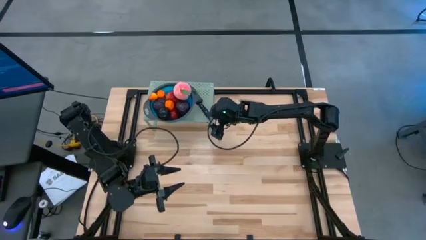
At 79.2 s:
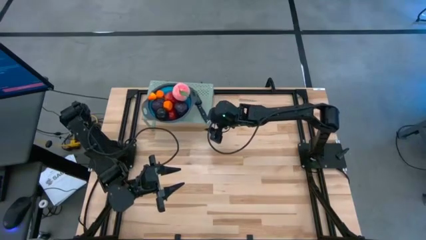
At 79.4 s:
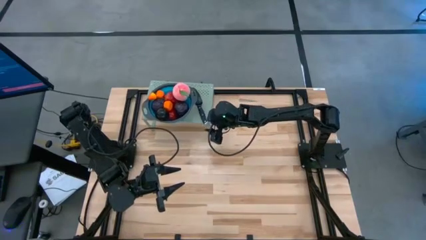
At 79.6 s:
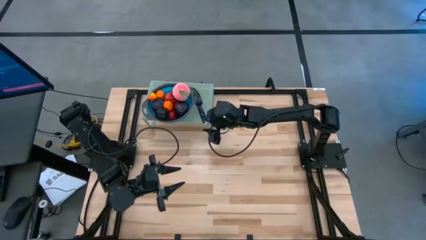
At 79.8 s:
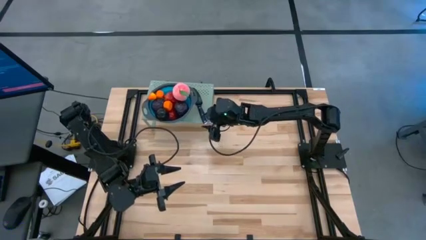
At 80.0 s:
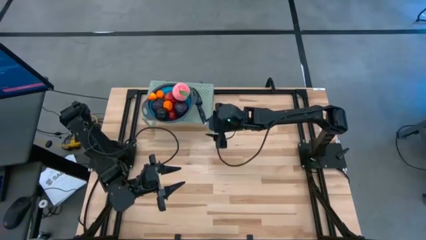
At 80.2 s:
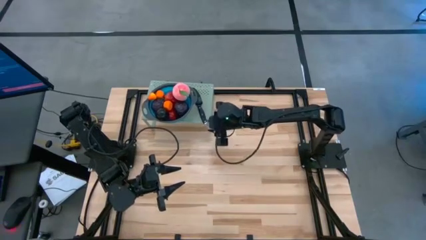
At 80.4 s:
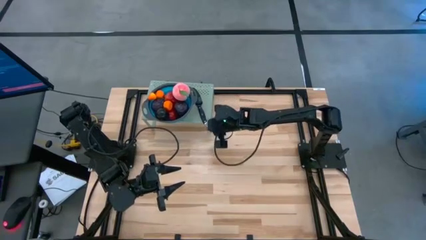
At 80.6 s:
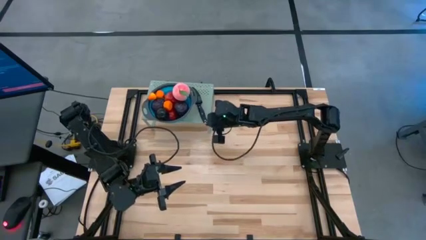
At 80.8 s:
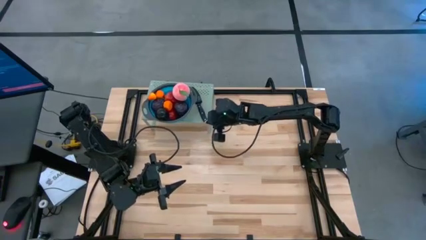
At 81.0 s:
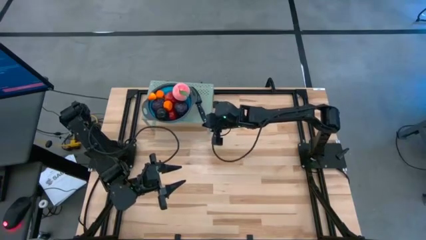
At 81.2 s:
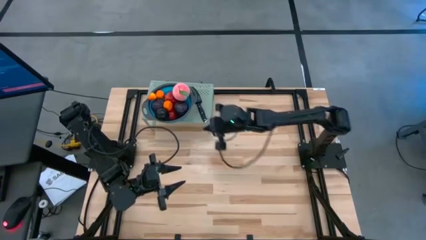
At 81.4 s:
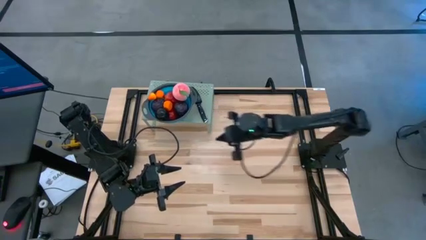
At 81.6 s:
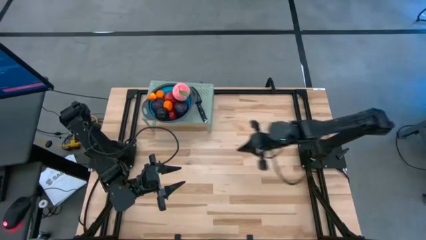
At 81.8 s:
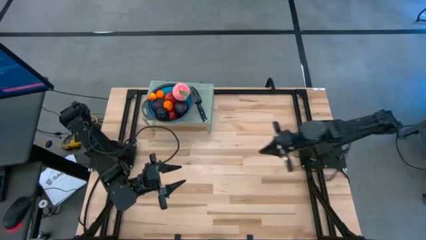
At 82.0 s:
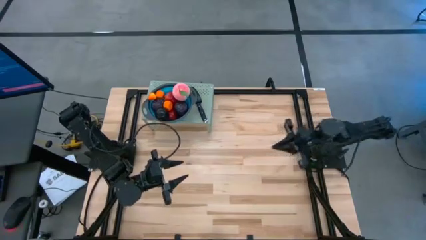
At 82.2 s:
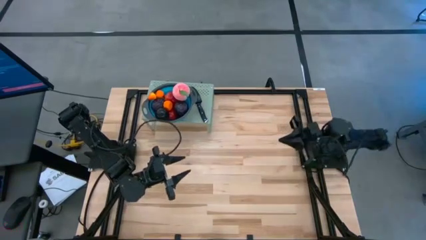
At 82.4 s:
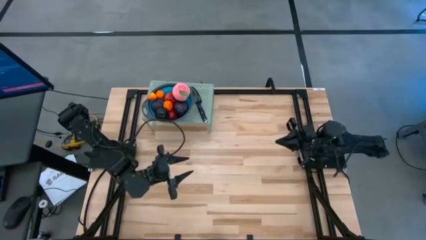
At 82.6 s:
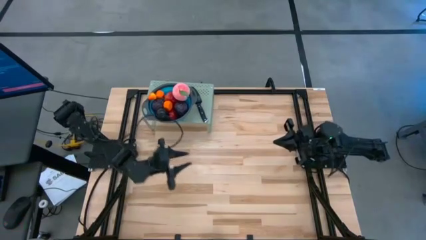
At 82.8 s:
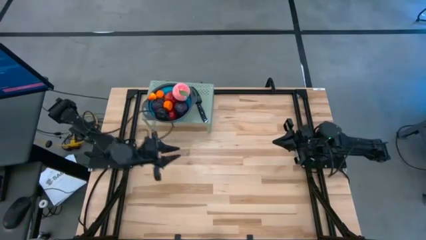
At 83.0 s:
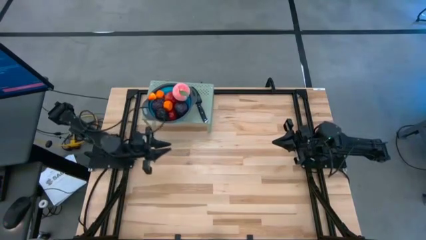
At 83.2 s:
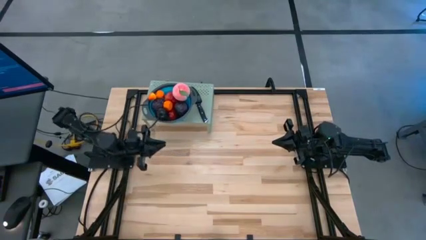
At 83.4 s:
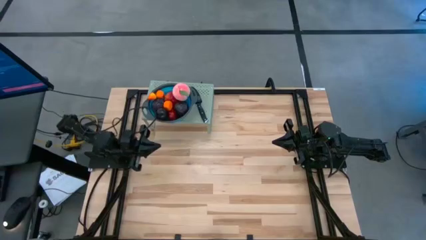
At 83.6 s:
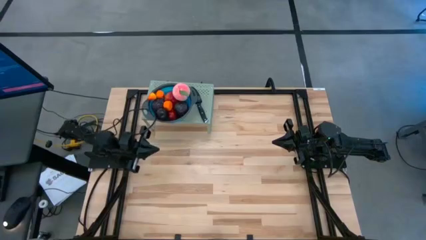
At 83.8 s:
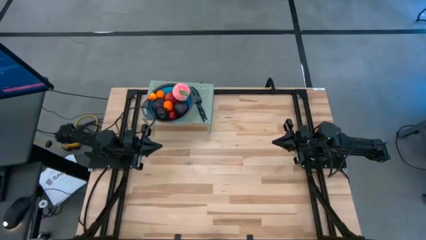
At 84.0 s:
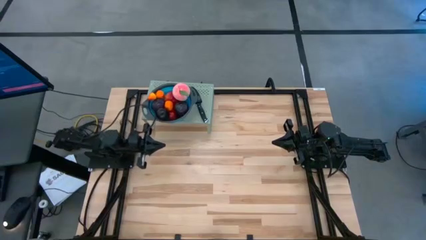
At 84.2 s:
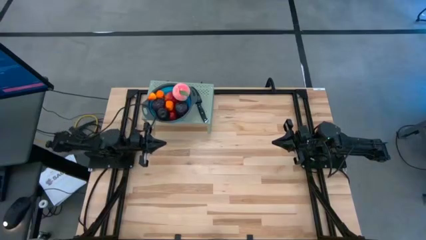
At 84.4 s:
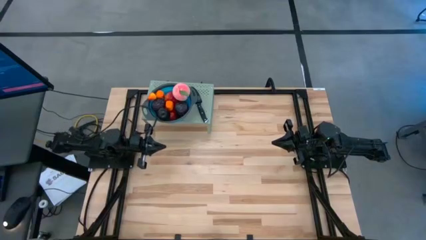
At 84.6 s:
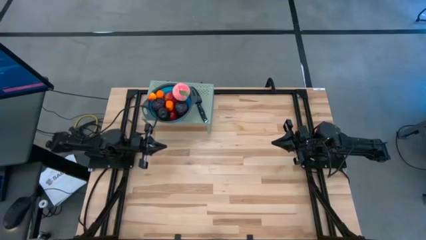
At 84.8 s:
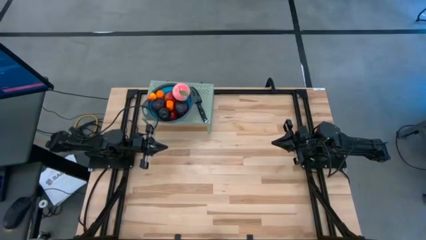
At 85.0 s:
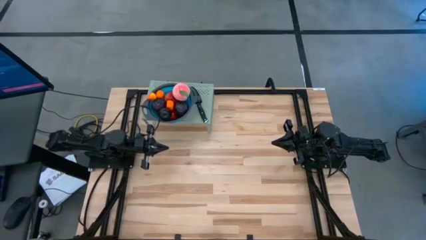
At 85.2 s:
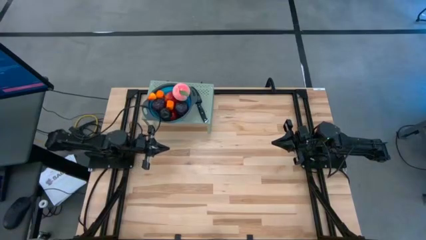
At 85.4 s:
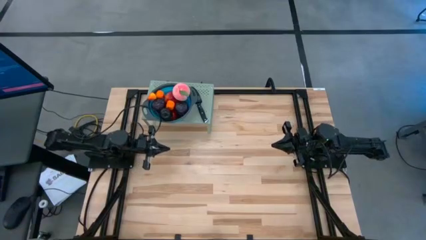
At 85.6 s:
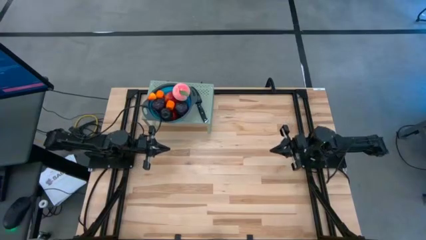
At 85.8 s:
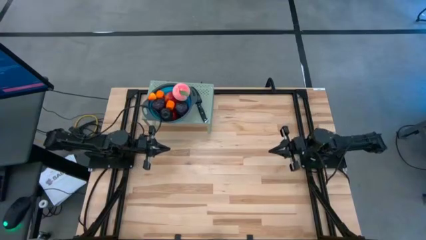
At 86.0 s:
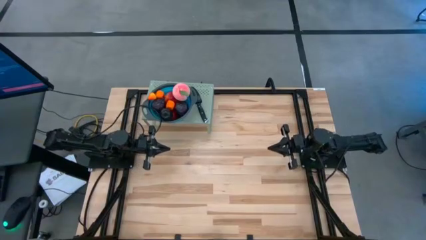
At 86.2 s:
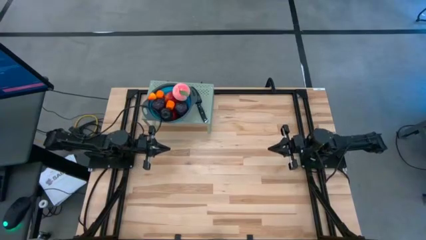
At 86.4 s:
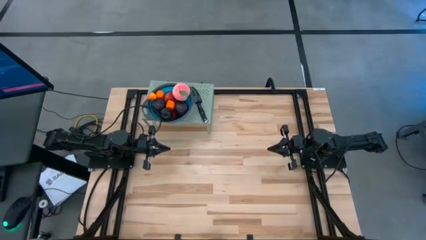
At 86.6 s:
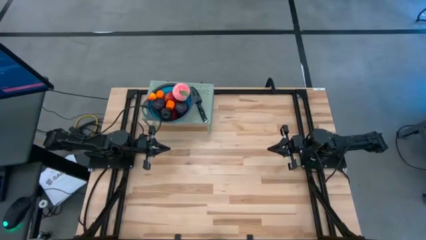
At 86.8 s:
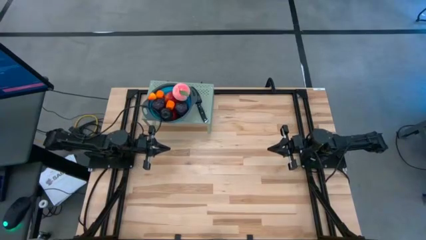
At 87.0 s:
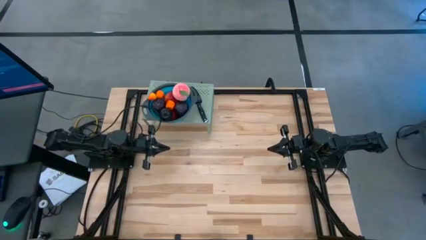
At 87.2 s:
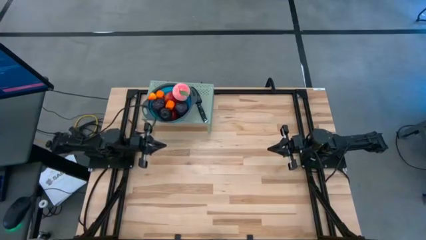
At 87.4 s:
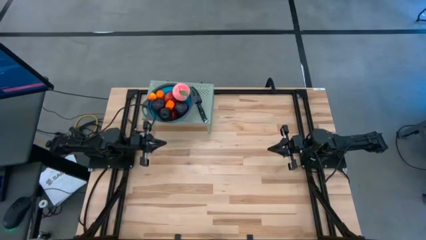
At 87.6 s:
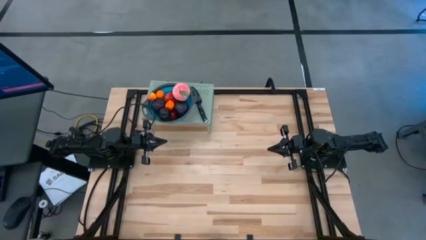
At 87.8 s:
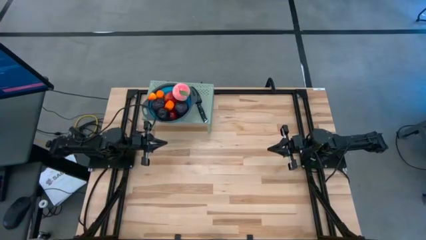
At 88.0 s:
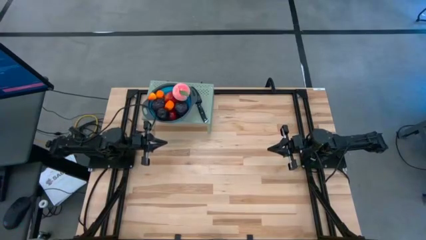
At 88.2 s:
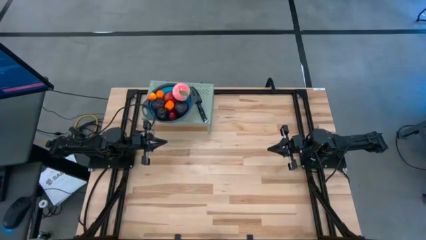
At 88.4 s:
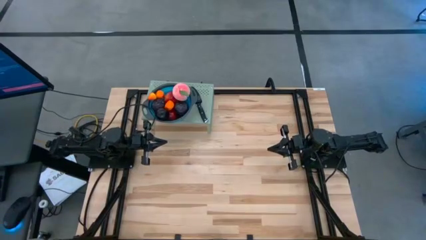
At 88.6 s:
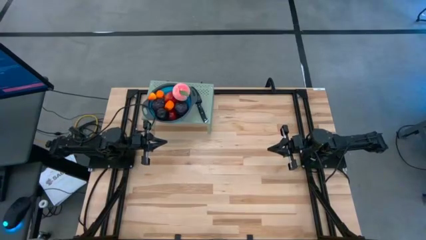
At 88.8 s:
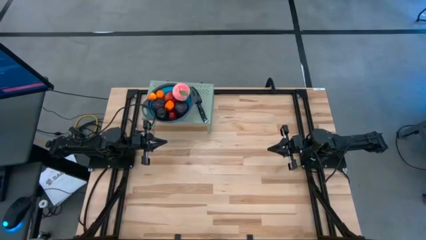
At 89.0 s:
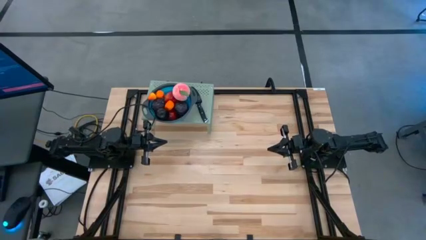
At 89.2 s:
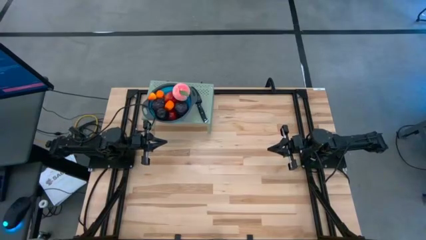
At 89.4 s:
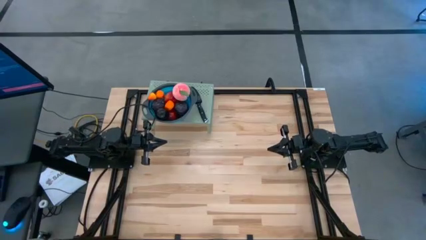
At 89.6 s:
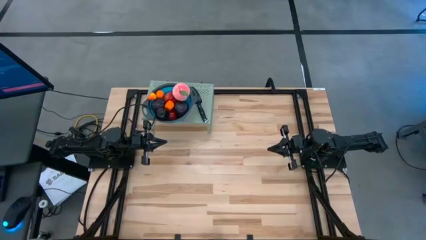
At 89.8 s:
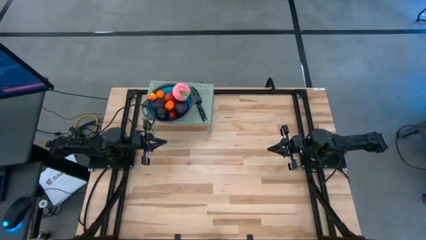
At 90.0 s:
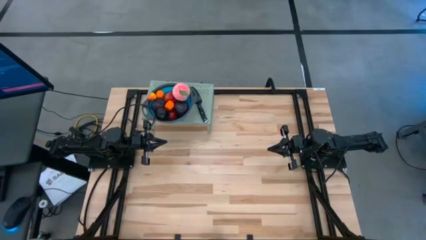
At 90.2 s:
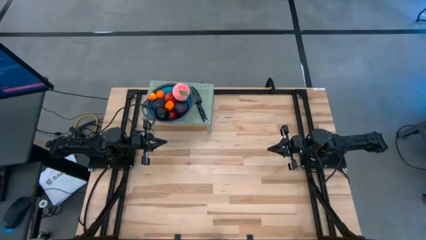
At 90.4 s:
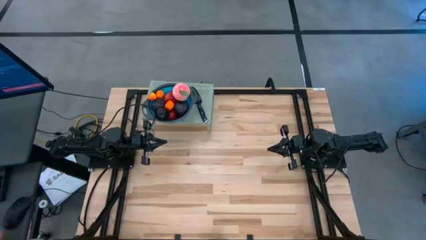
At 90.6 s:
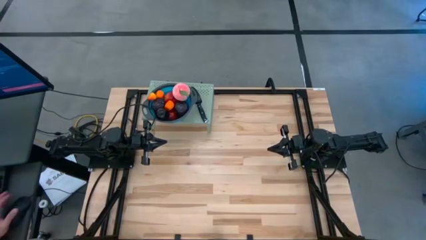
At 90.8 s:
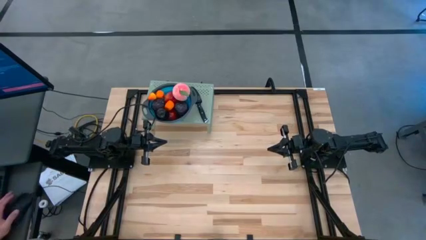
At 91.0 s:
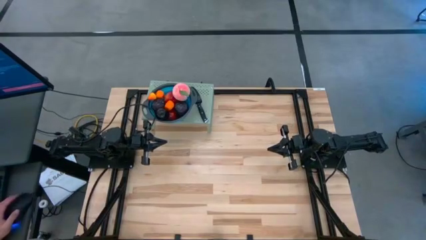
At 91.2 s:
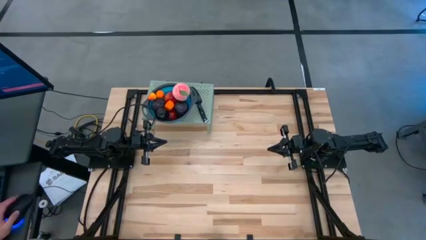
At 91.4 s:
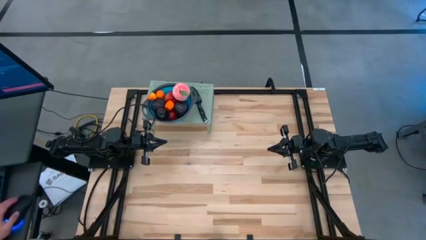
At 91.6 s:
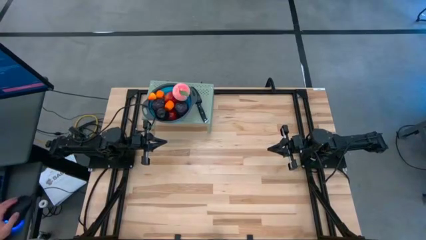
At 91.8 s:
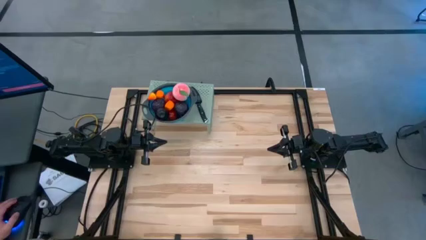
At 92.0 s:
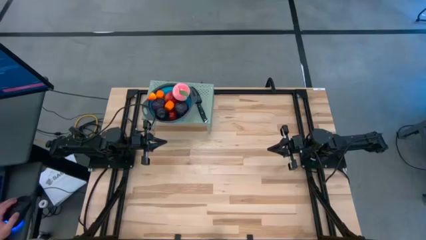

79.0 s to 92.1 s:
Task: Pick & Place Fruit
Return to Home Position

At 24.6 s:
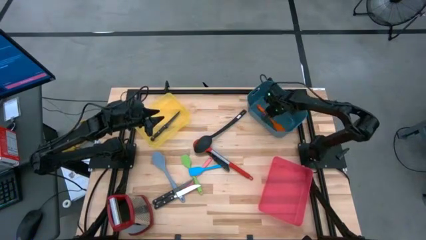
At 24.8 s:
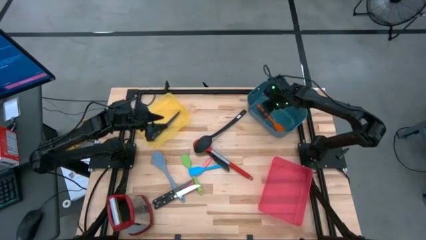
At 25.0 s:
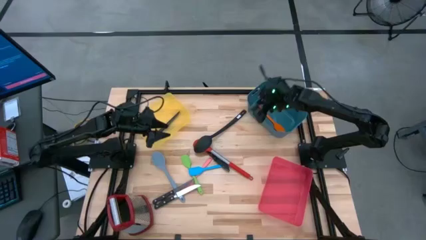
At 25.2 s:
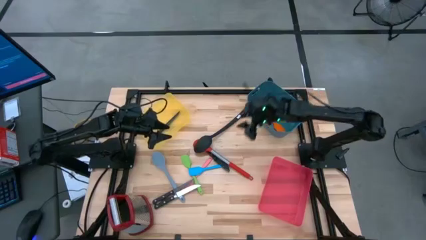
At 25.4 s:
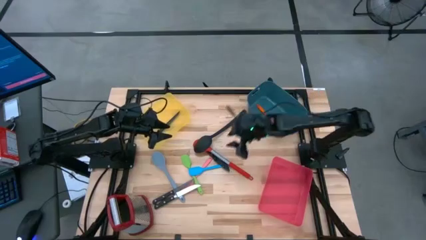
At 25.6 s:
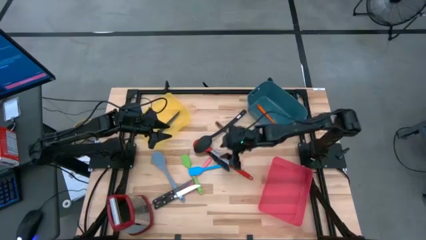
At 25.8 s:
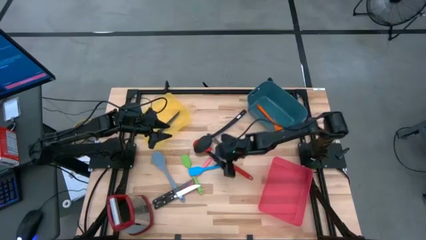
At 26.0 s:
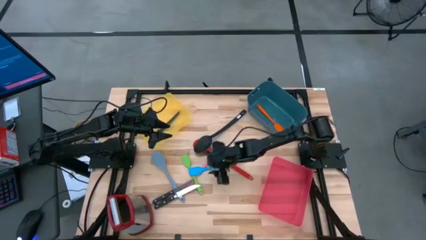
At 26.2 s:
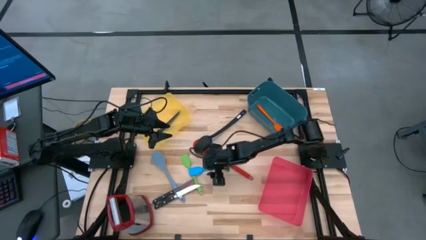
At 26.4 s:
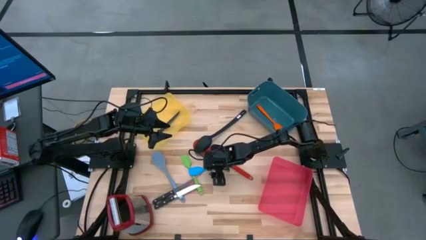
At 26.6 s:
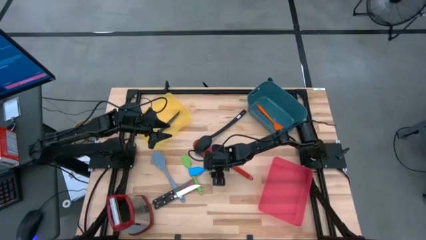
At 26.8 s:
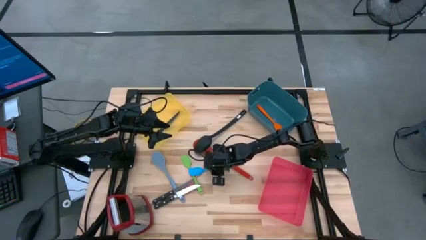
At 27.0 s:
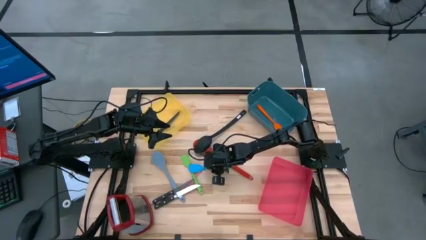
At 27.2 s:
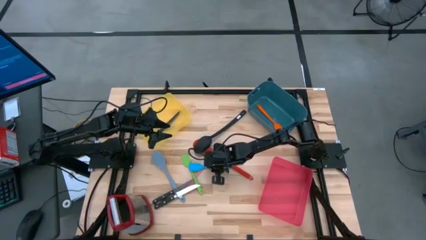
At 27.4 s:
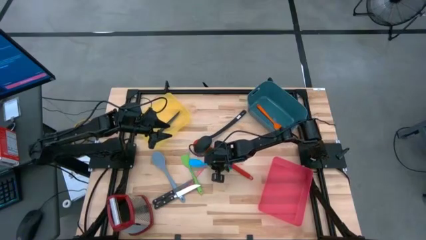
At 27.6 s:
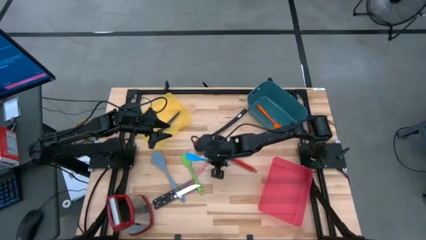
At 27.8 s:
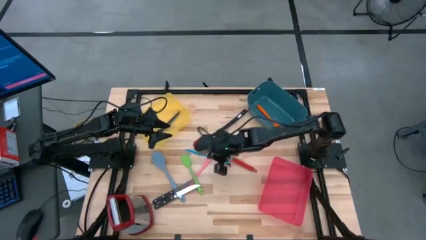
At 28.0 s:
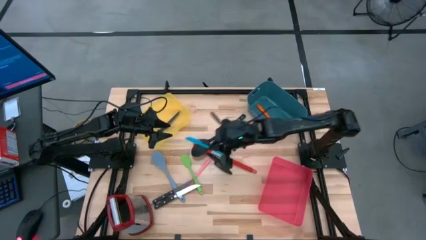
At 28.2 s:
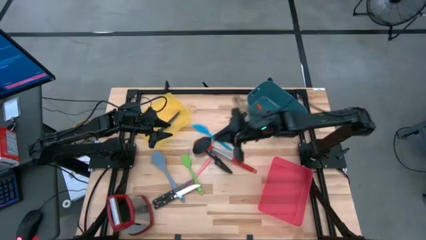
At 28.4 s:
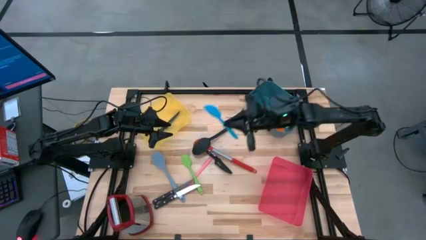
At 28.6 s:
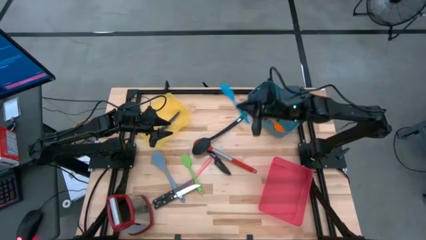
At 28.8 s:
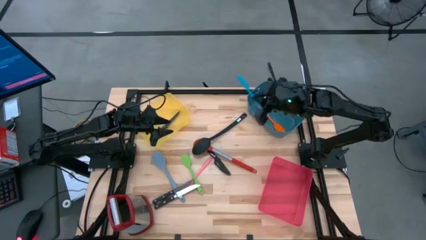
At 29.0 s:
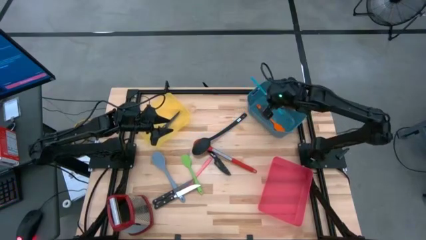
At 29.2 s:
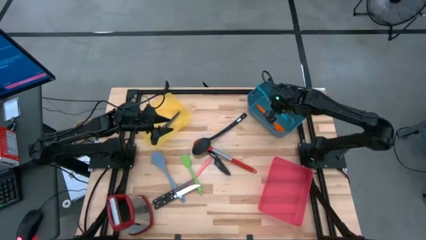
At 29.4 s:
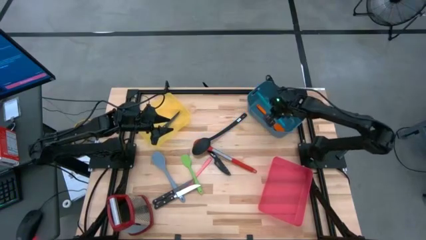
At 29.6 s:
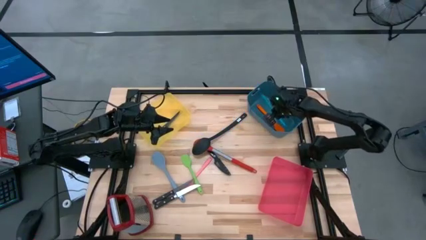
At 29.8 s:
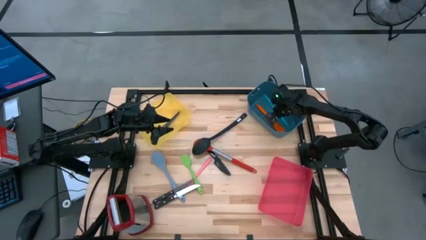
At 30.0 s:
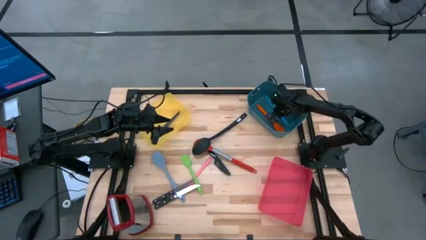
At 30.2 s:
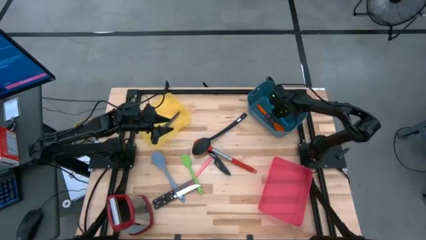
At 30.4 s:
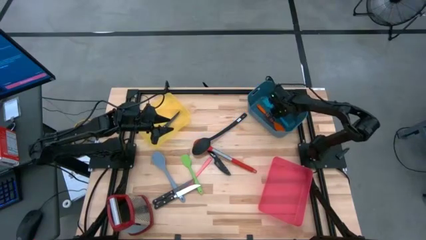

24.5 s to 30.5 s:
Task: Pick & Place Kitchen Items
Put the blue spatula into the green bin
